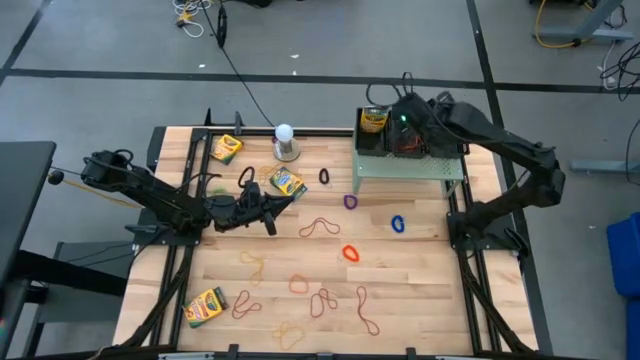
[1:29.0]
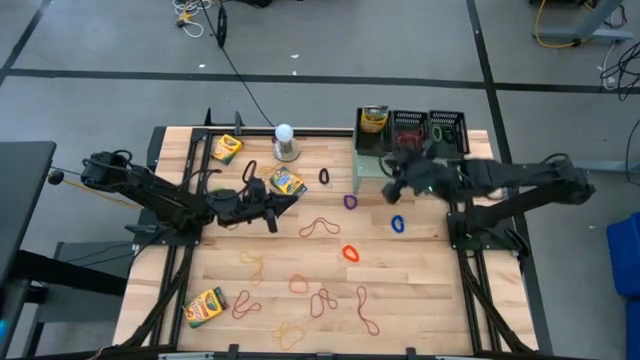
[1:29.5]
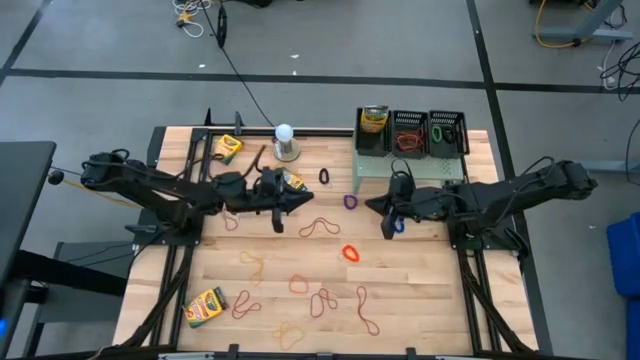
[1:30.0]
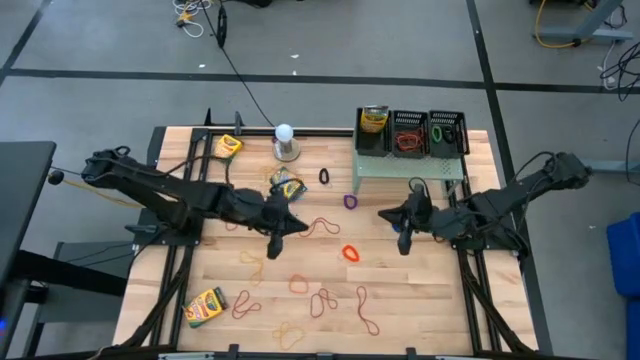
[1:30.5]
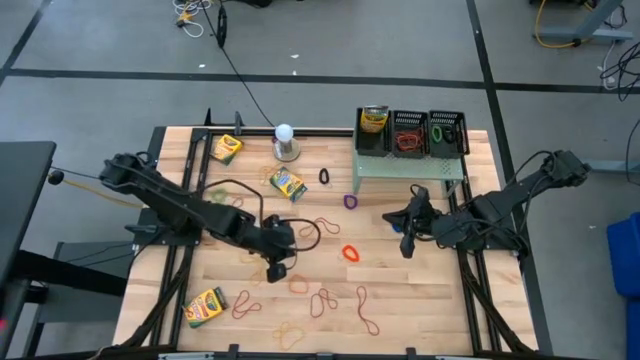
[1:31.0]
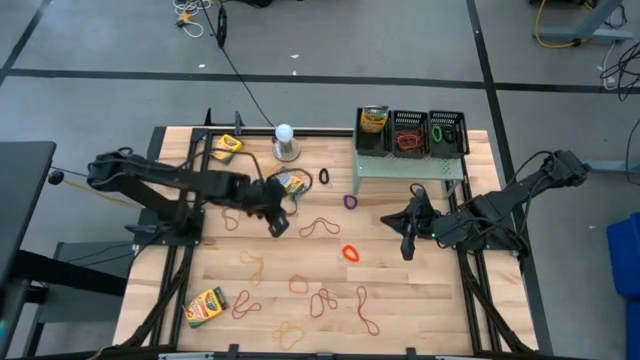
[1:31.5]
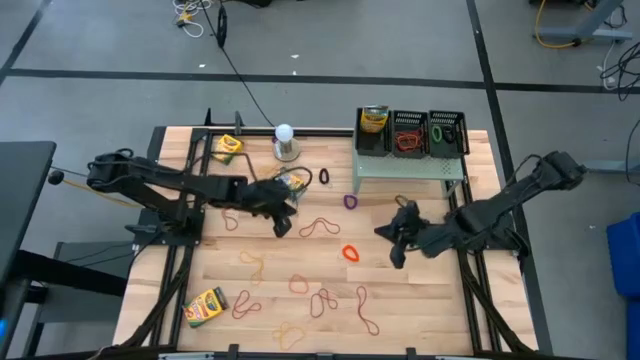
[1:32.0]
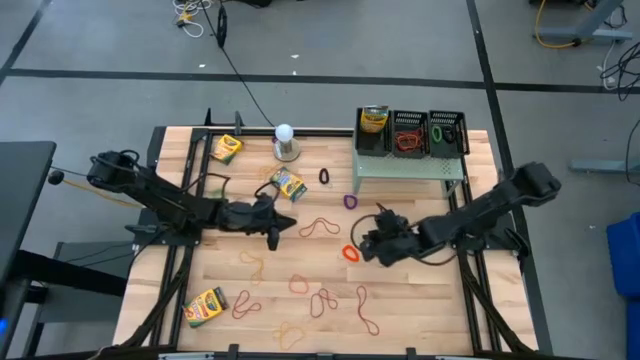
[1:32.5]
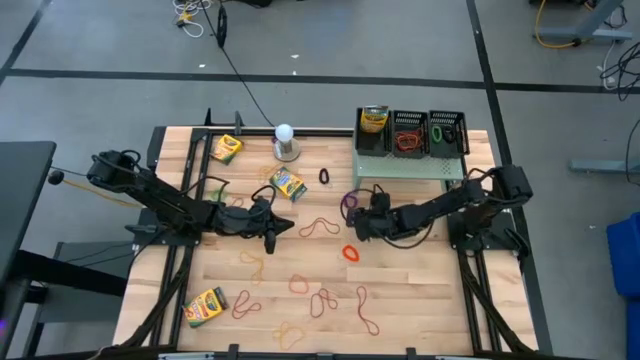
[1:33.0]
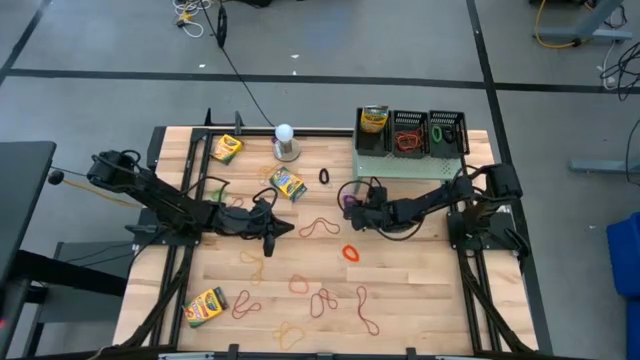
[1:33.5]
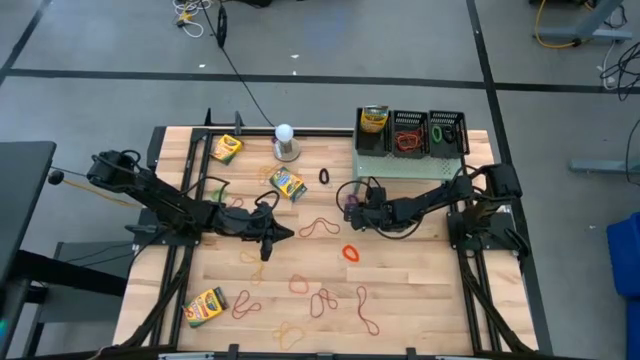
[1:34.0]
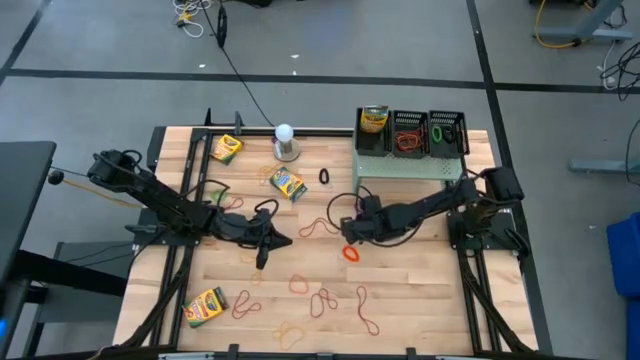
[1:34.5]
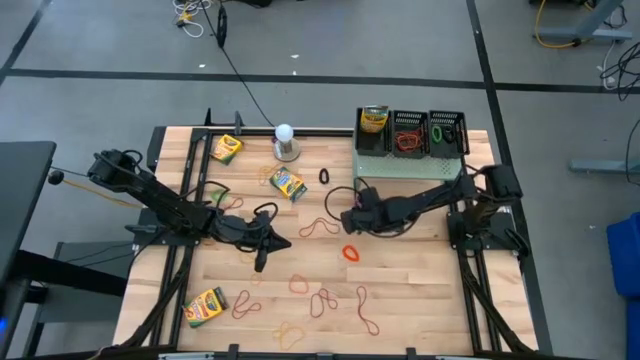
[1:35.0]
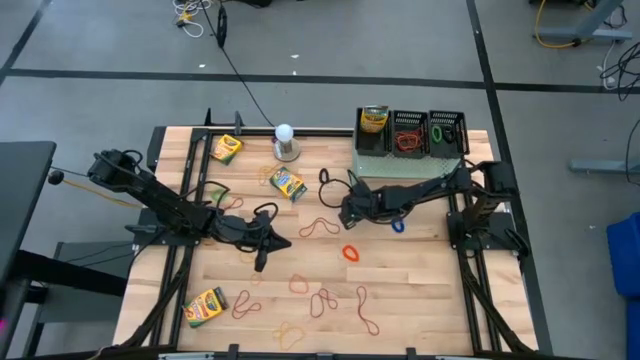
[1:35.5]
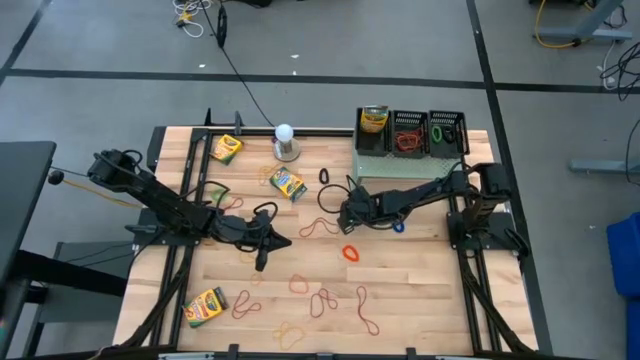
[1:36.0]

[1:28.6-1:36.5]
Task: Pick & Place Office Desk Supplies
Put the bottom violet spring keychain into the right basket on the shelf

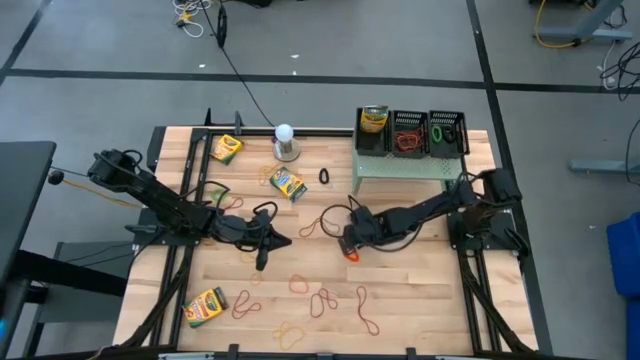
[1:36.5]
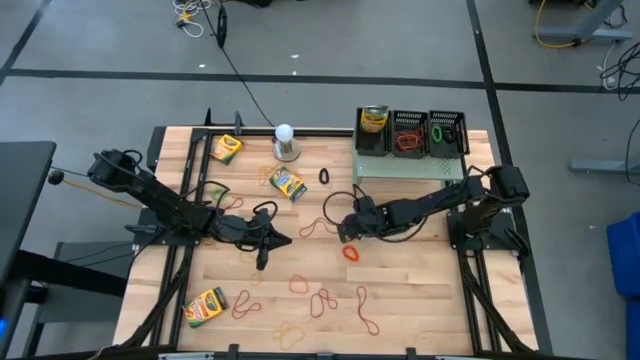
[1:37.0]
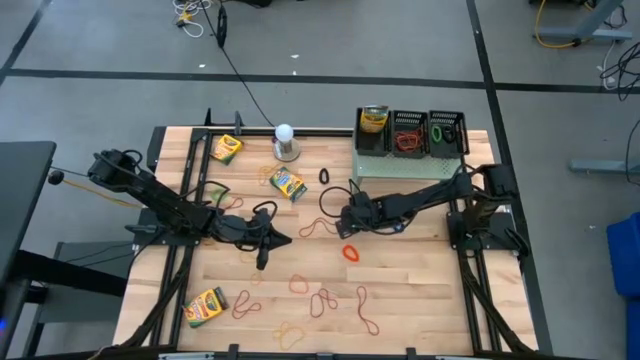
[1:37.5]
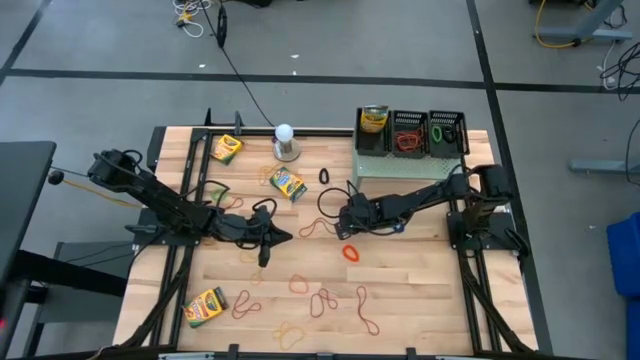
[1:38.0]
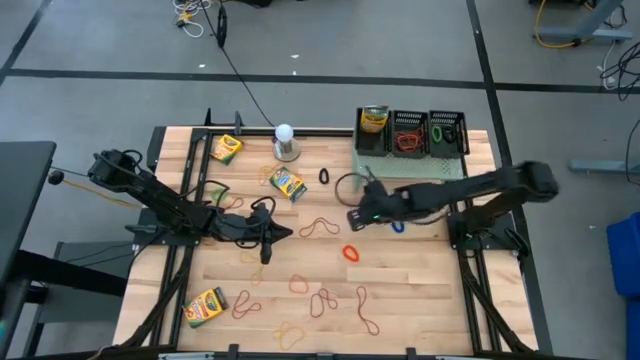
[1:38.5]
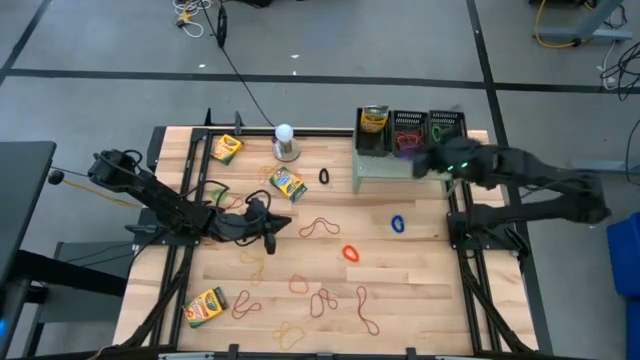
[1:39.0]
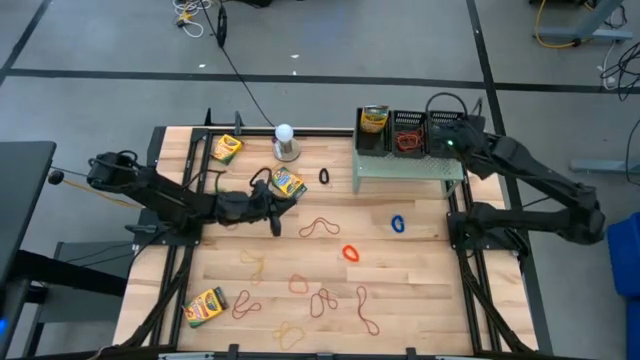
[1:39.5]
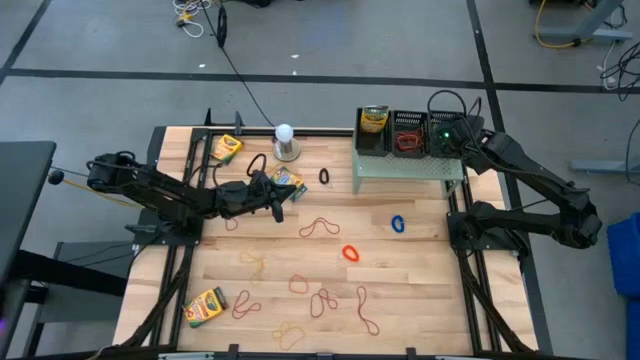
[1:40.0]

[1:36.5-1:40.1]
Put the bottom violet spring keychain into the right basket on the shelf

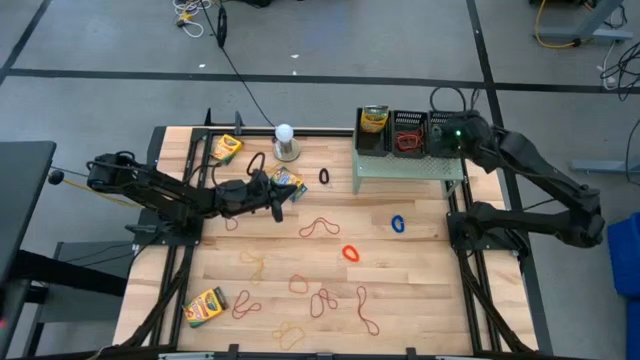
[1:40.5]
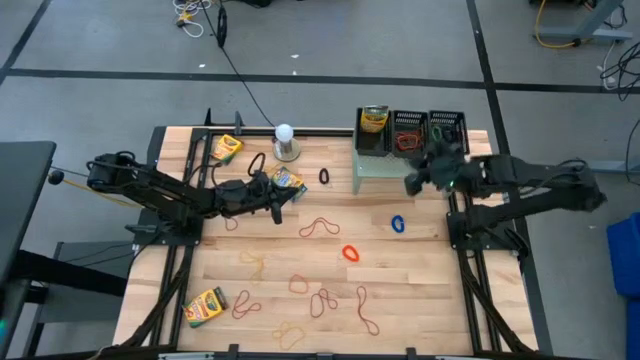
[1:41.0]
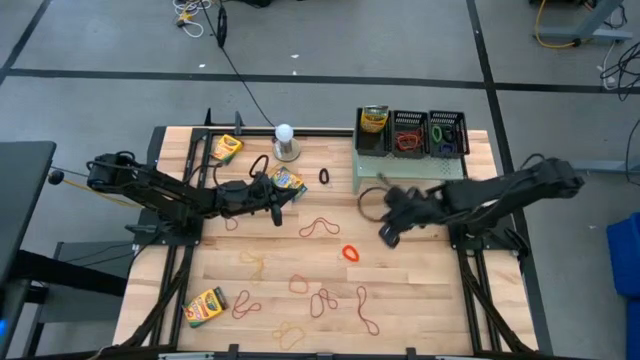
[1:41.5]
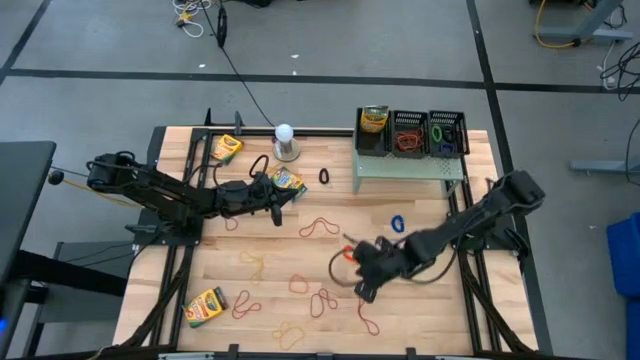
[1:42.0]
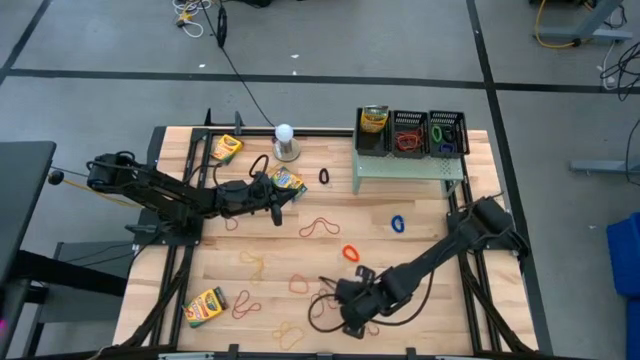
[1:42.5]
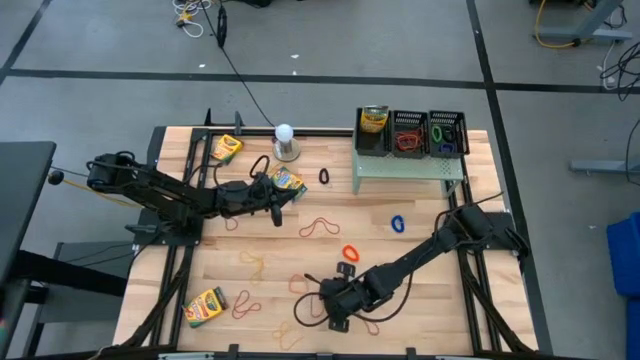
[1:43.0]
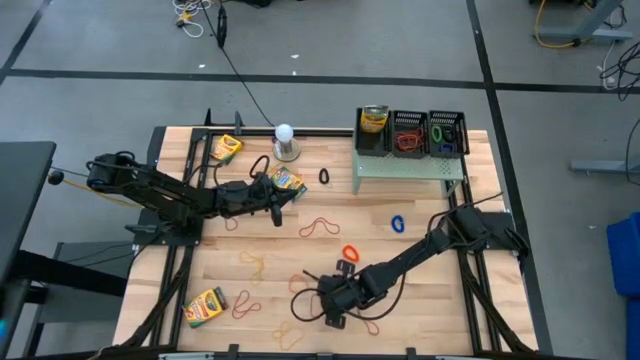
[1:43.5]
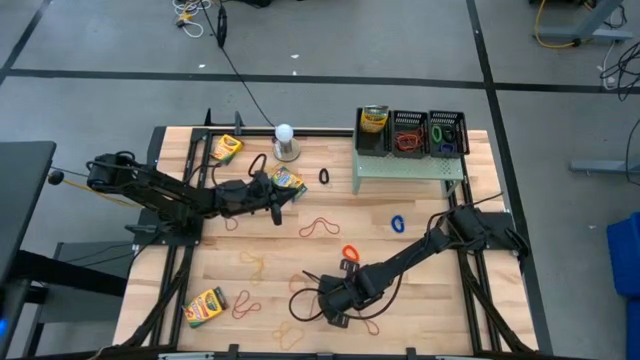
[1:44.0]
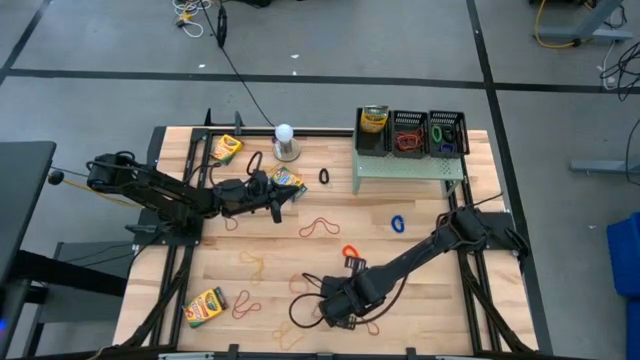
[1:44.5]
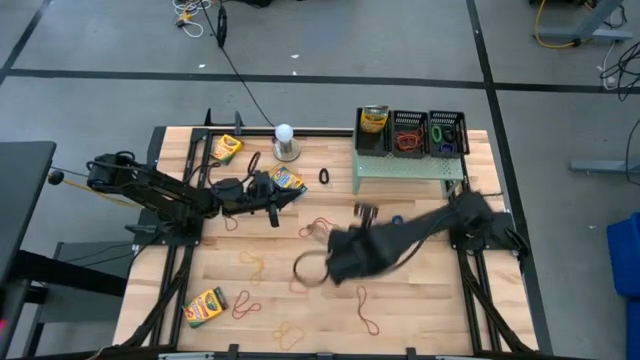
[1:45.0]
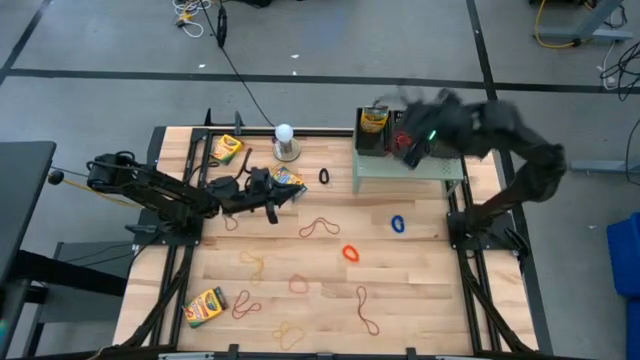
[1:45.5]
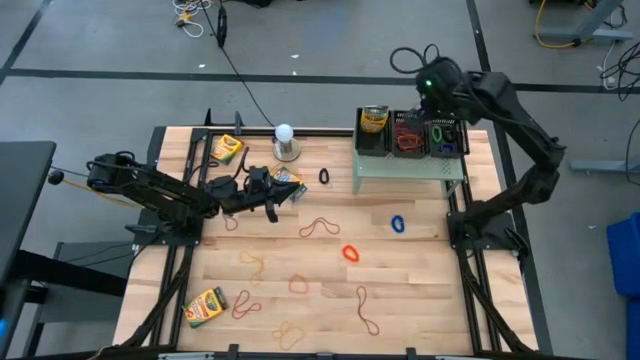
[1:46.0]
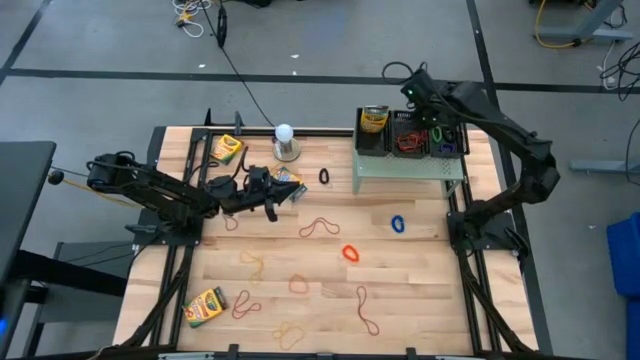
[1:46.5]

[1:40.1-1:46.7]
Put the red rubber band into the middle basket on the shelf

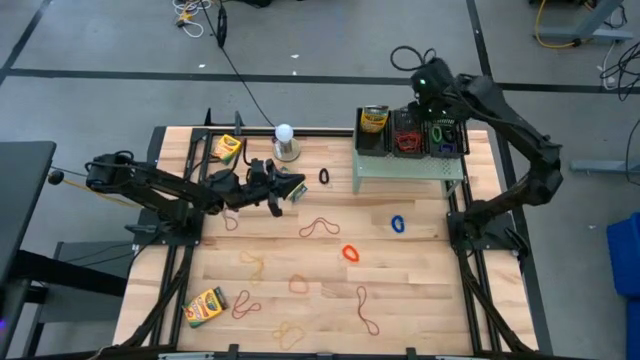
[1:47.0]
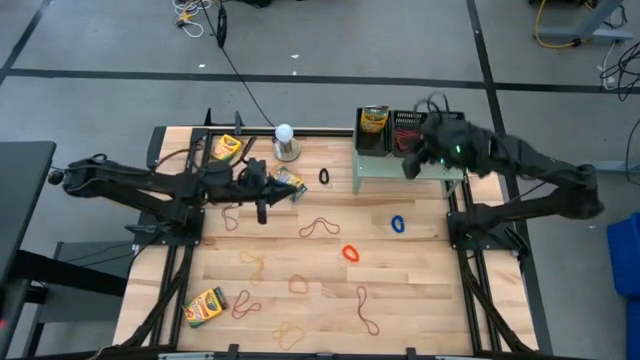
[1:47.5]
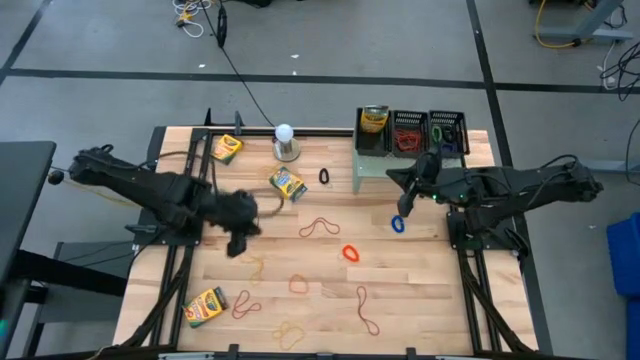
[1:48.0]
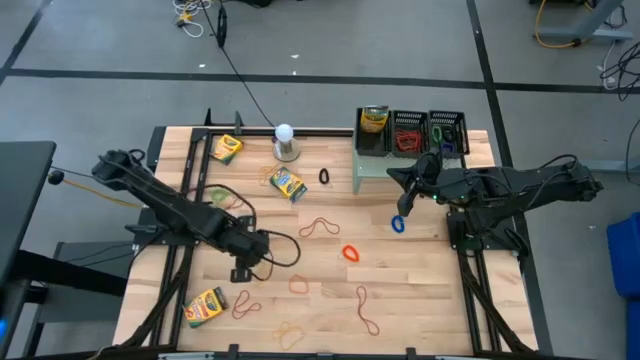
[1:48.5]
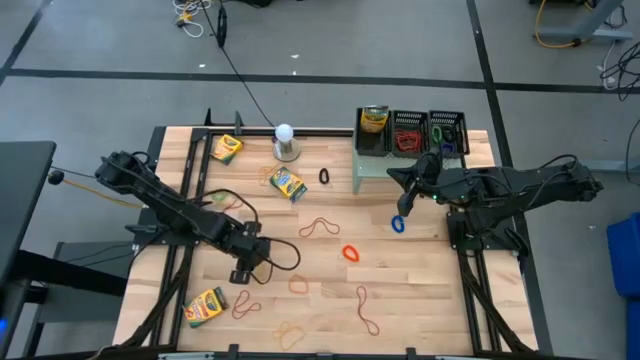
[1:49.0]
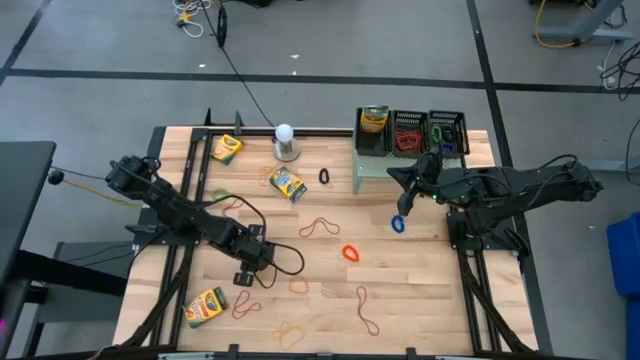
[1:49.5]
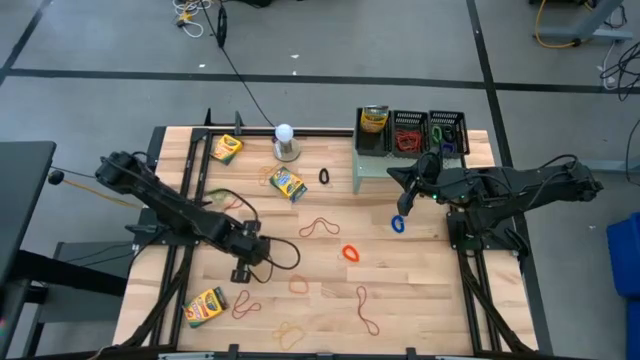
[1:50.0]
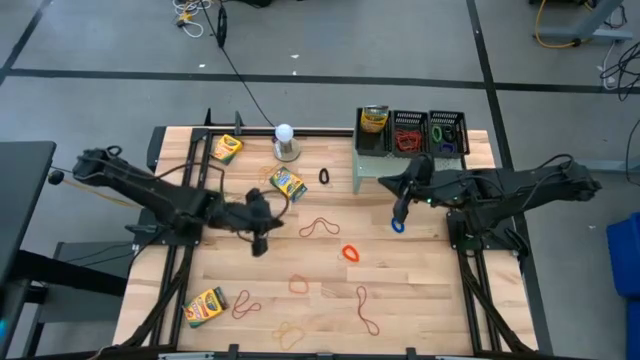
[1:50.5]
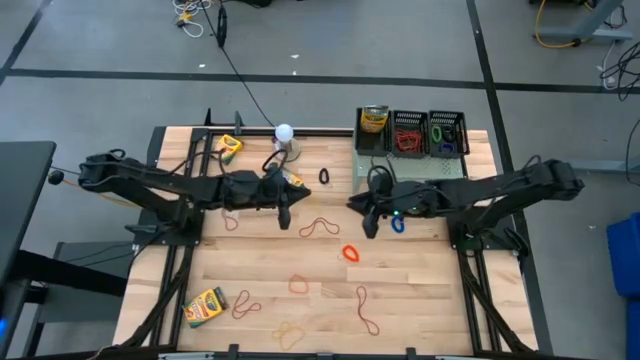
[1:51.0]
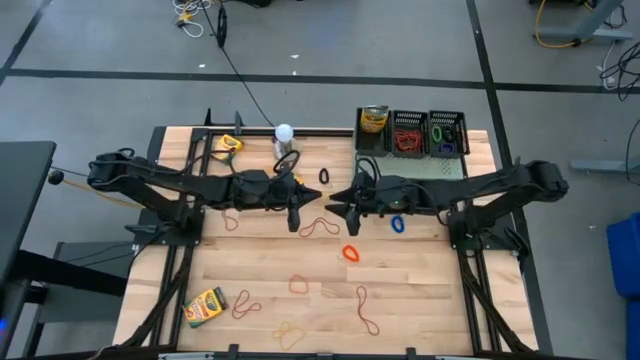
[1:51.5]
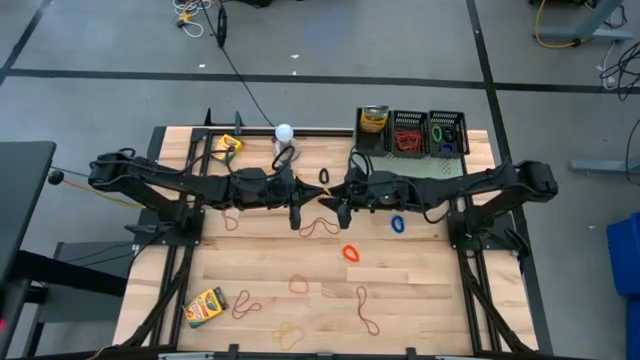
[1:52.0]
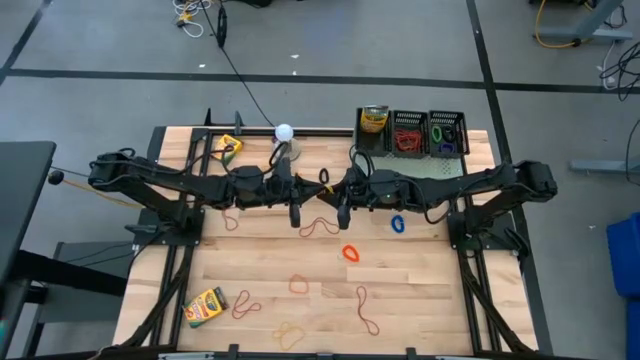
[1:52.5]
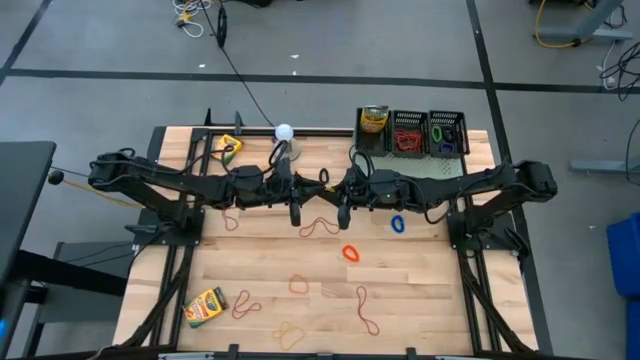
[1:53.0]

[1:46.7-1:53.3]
Put the middle yellow rubber band into the middle basket on the shelf
